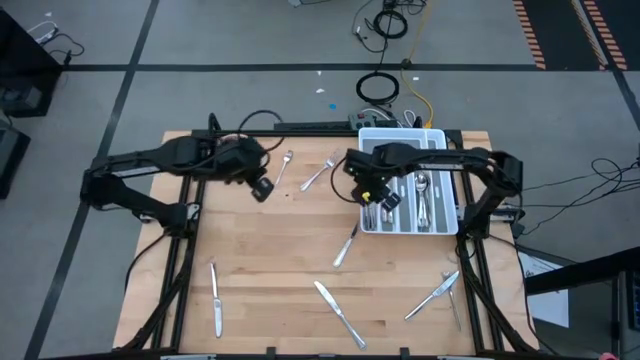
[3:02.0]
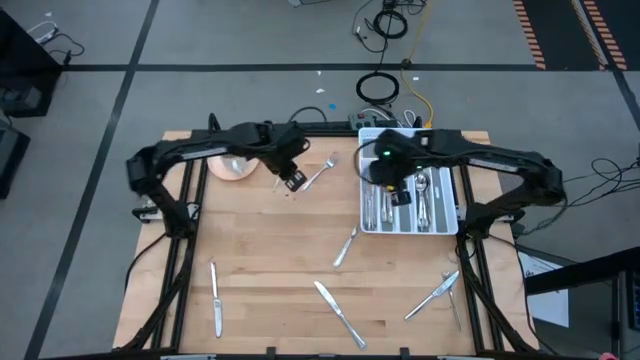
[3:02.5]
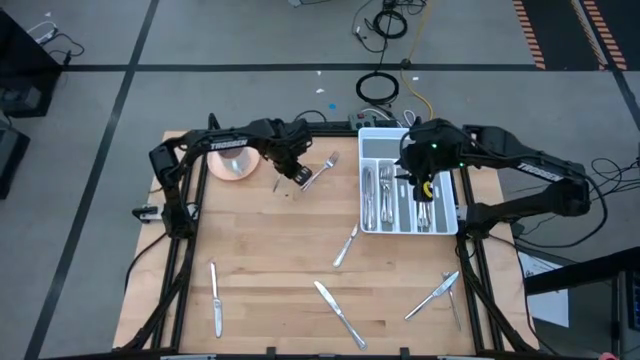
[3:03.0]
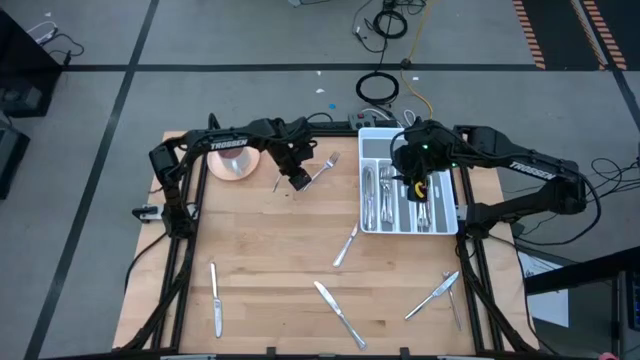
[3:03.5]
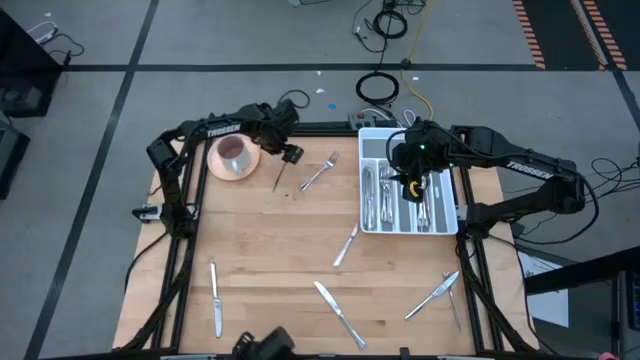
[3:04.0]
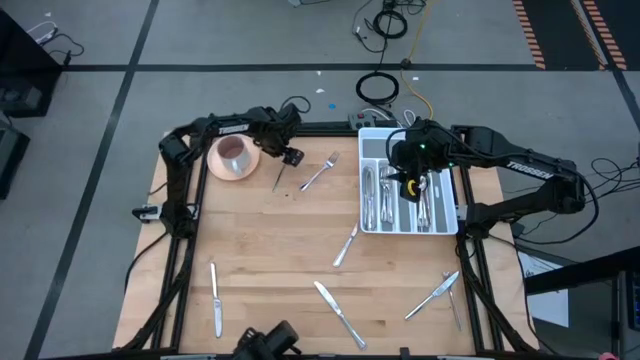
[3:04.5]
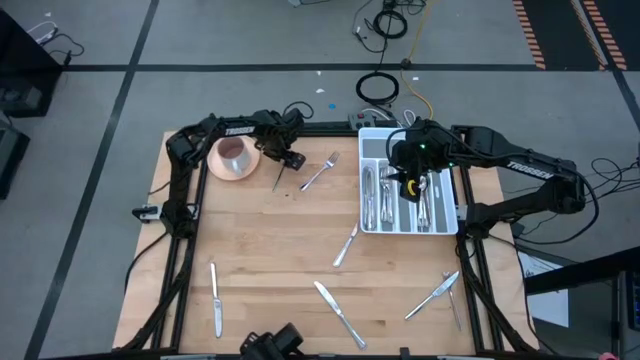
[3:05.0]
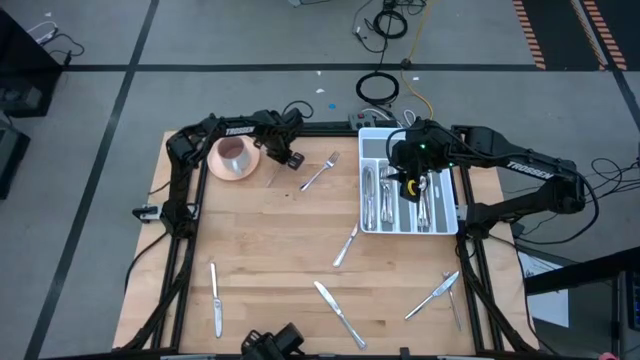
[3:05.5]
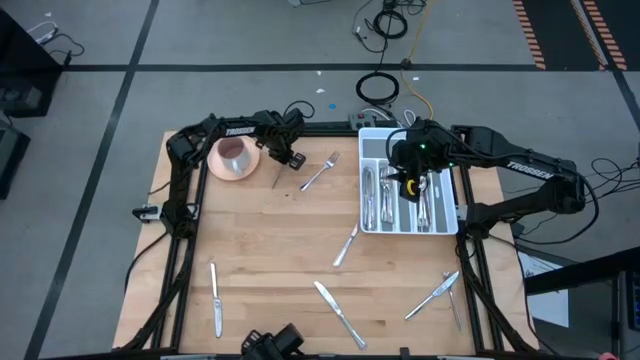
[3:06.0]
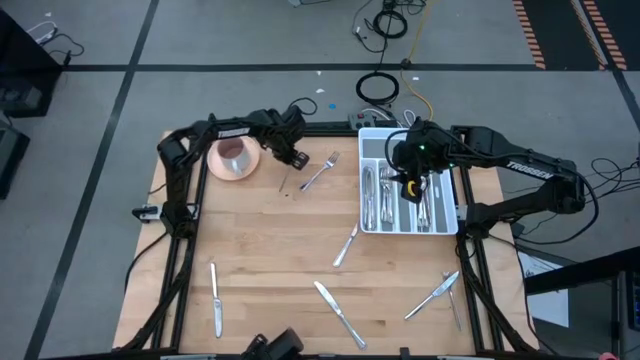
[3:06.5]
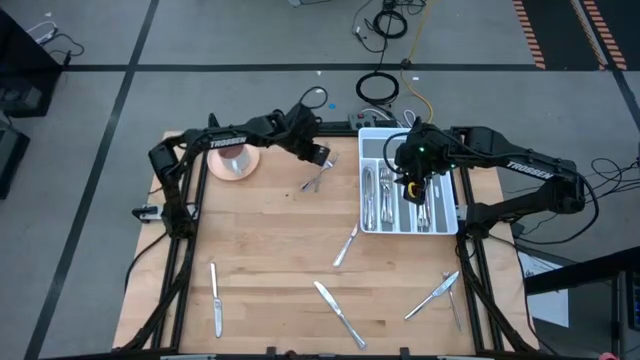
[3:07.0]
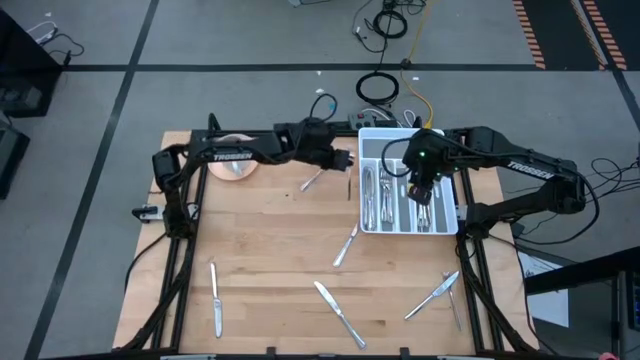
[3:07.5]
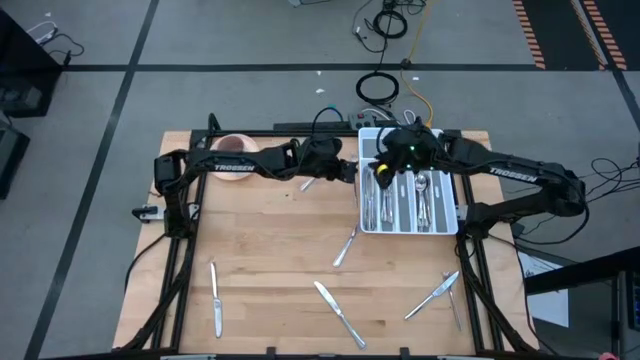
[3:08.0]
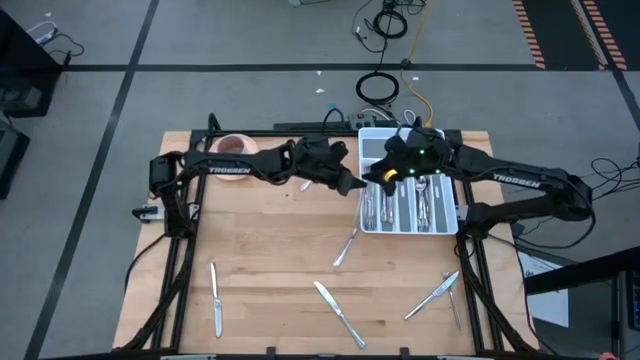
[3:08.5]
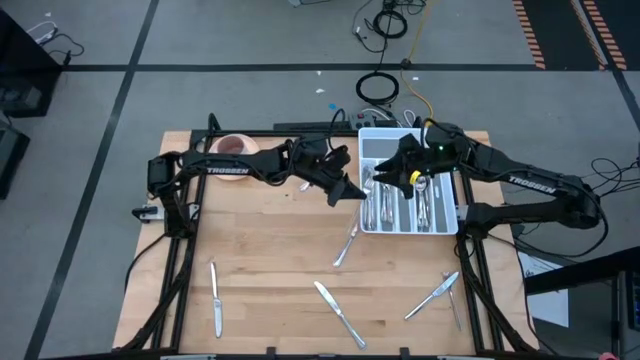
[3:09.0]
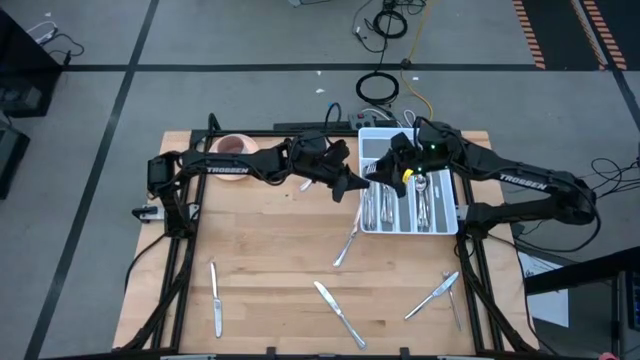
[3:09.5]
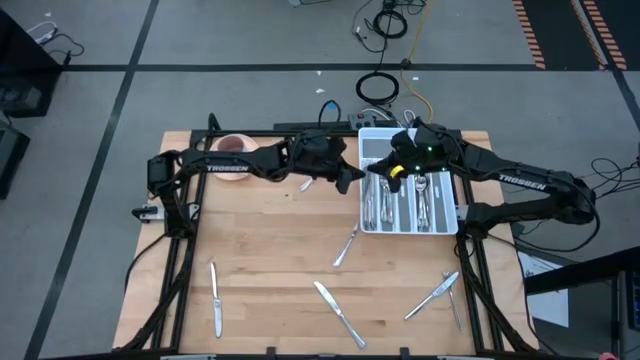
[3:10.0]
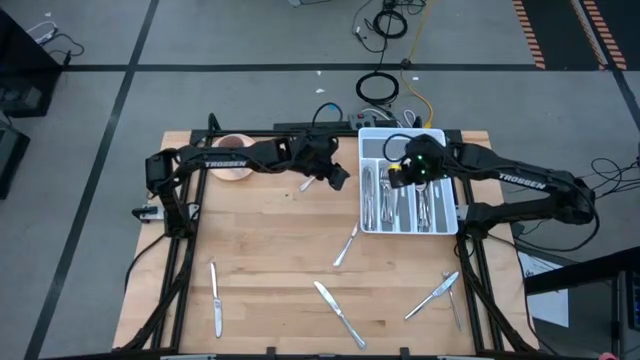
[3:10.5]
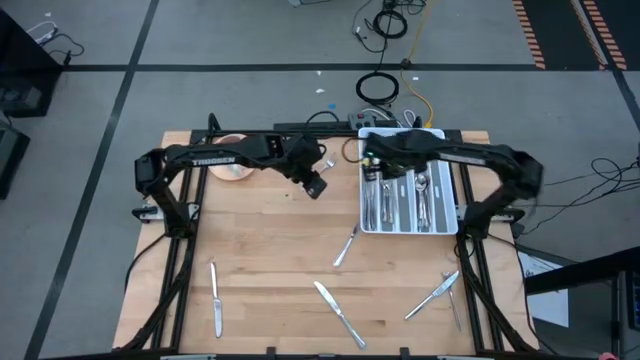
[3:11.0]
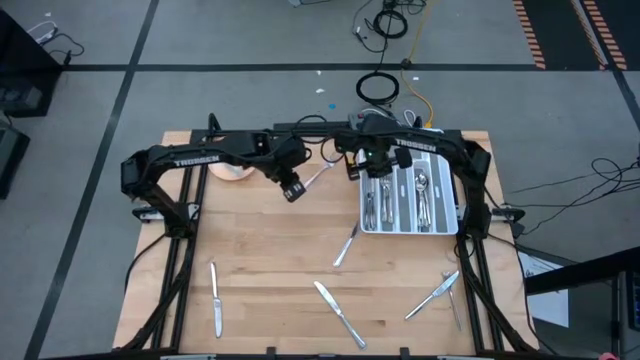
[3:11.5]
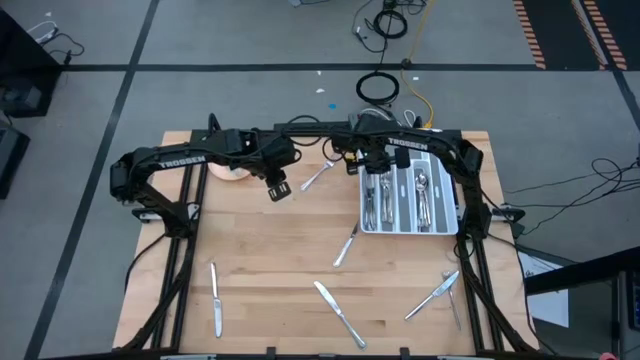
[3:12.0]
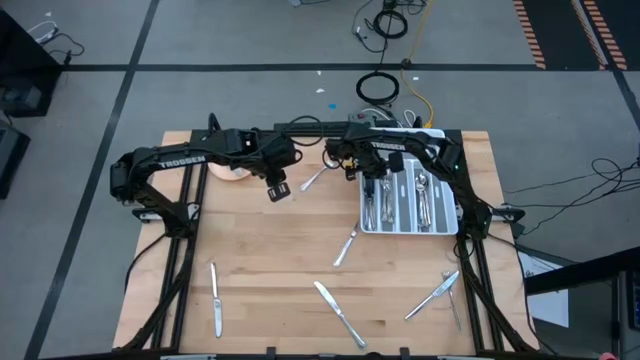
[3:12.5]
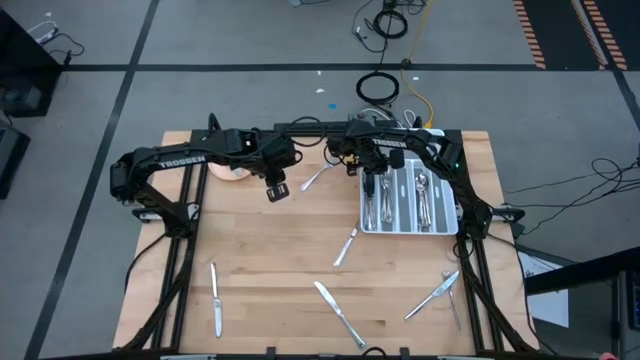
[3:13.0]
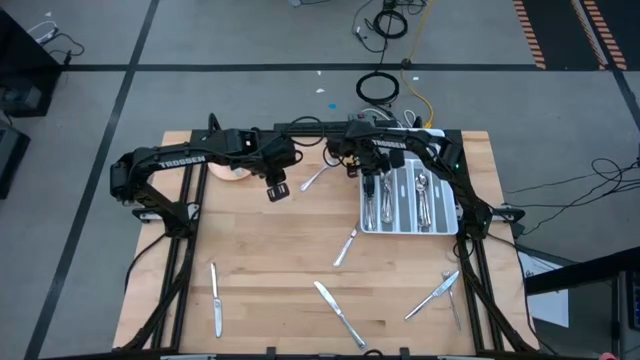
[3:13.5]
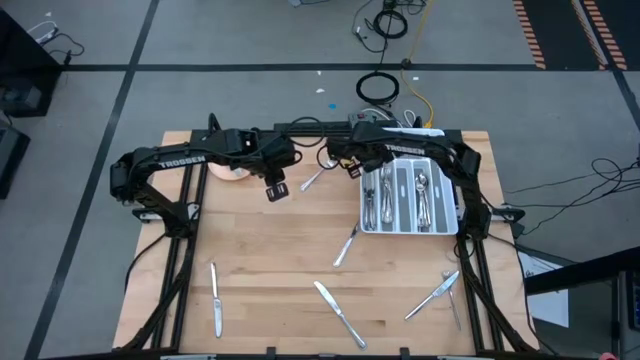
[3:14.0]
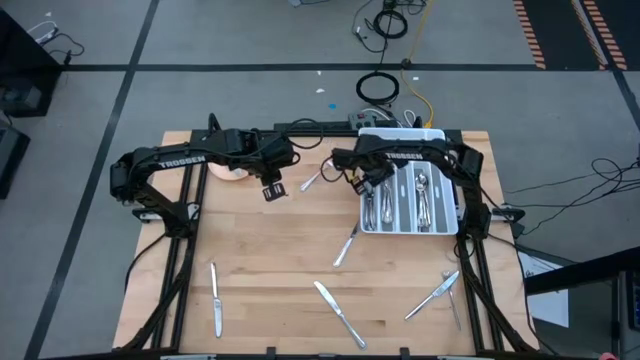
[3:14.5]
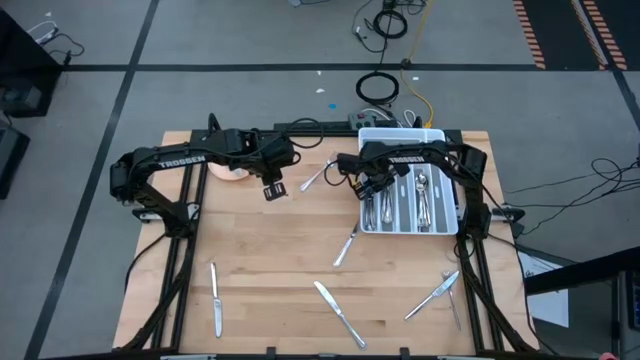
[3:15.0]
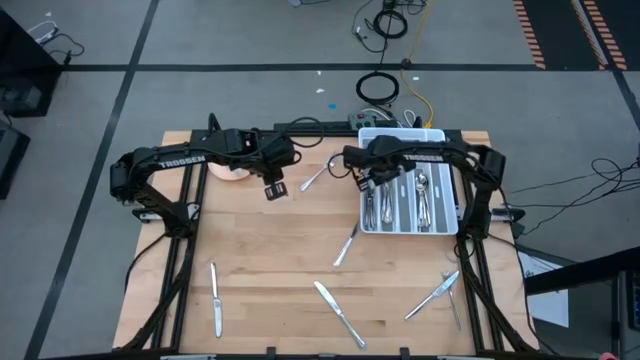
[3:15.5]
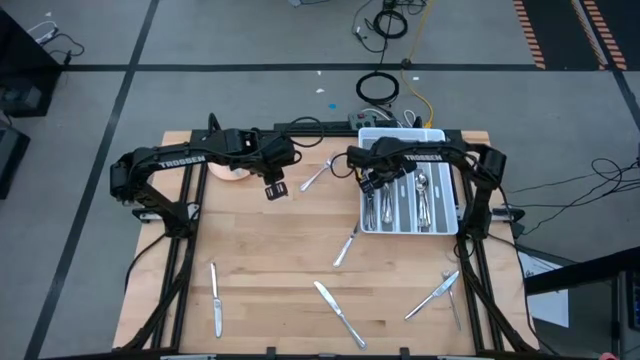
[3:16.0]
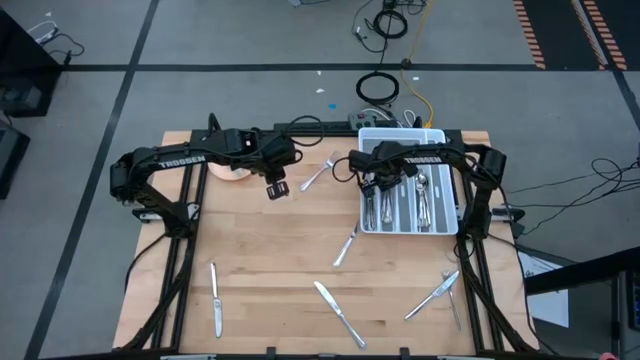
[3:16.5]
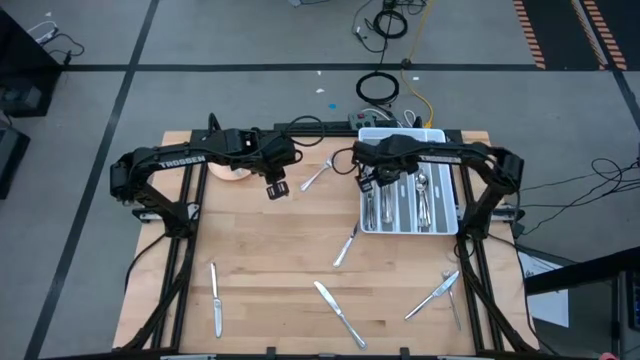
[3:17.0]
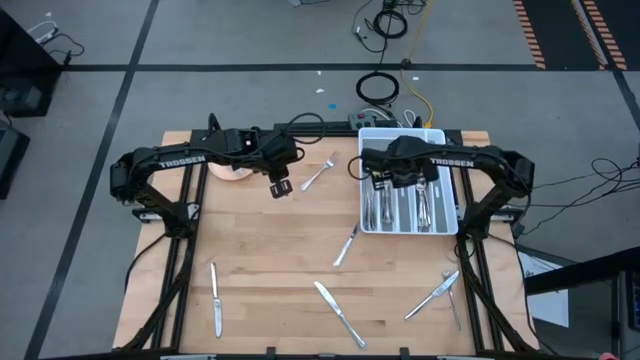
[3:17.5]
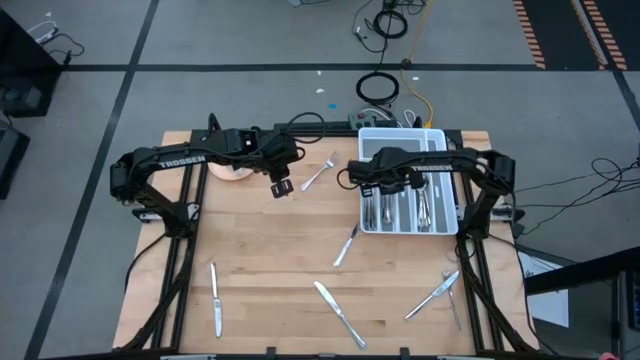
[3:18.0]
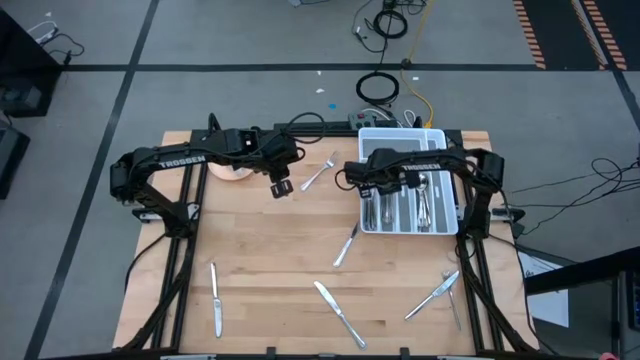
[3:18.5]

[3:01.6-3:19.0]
Task: Sort silverware
Put the silver fork into the white silverware tray

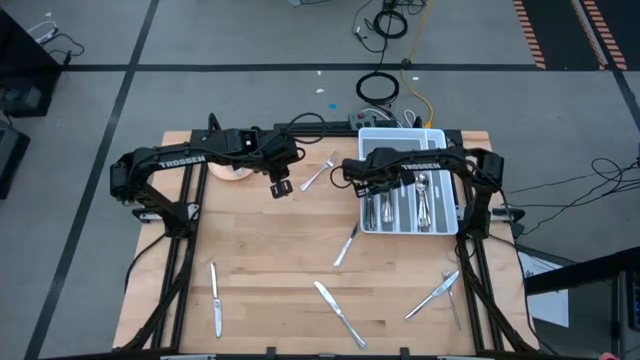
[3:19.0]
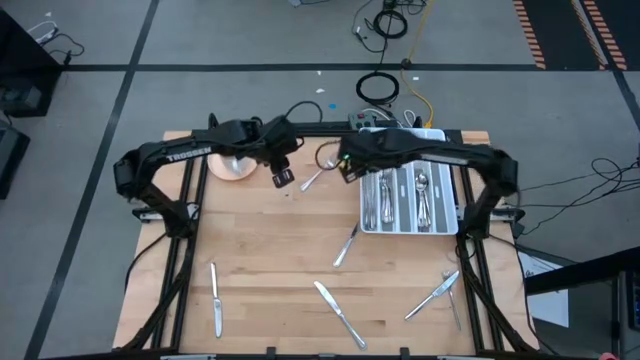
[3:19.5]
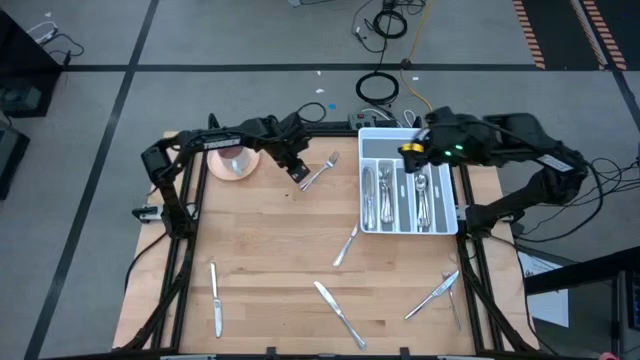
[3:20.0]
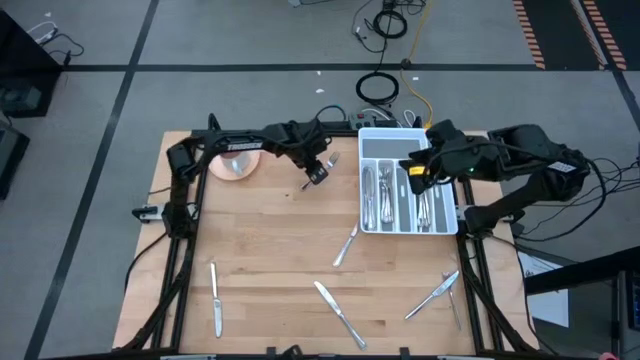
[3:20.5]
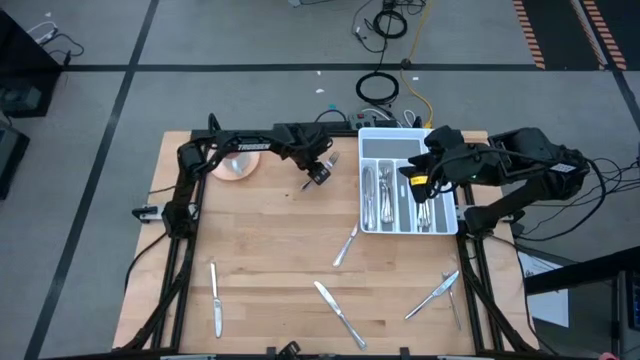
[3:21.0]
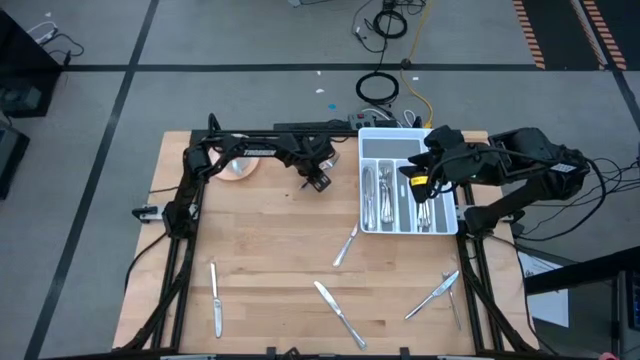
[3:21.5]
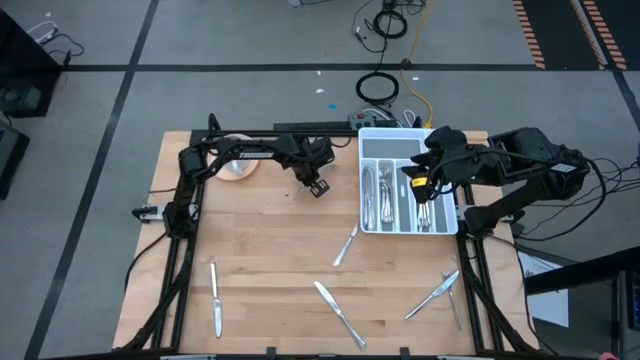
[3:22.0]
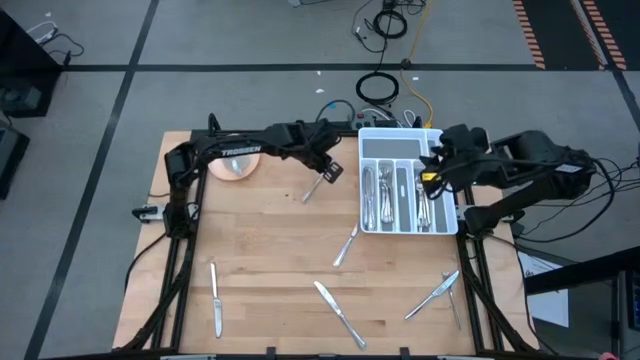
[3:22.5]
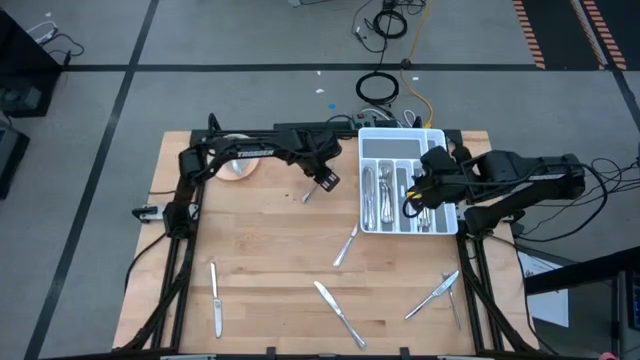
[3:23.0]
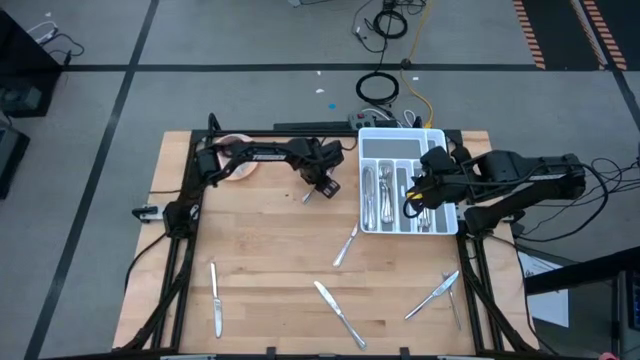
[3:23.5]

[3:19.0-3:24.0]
Put the silver fork into the white silverware tray
